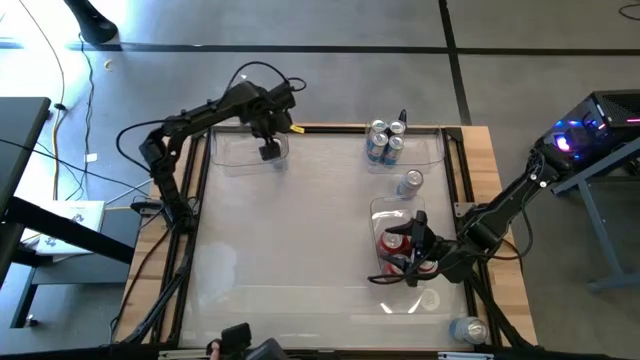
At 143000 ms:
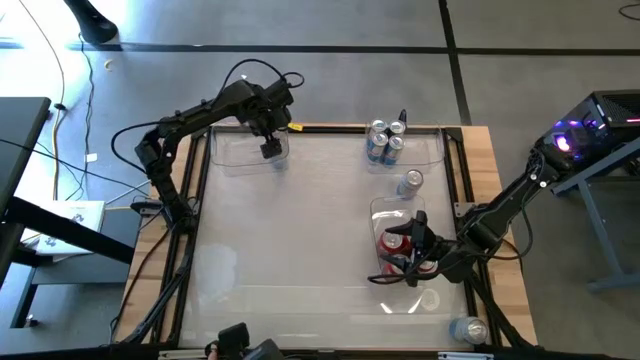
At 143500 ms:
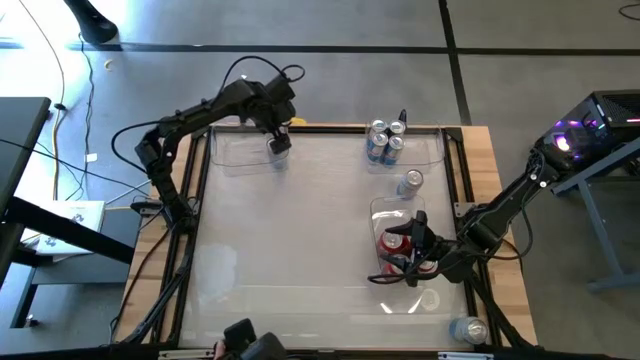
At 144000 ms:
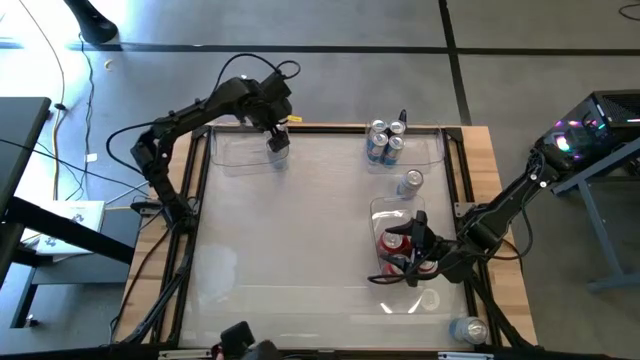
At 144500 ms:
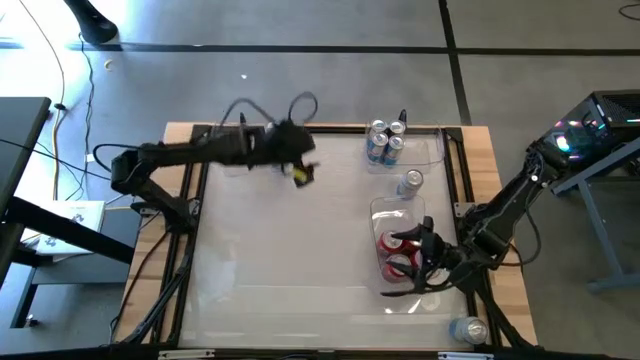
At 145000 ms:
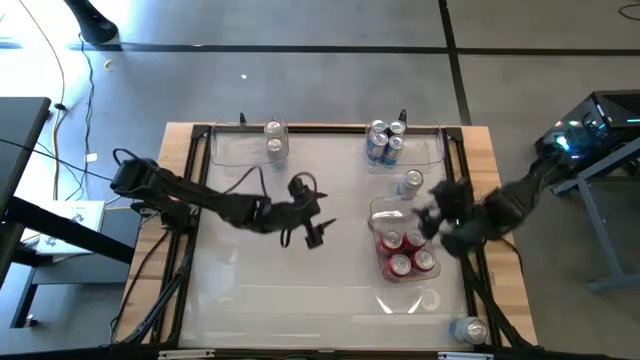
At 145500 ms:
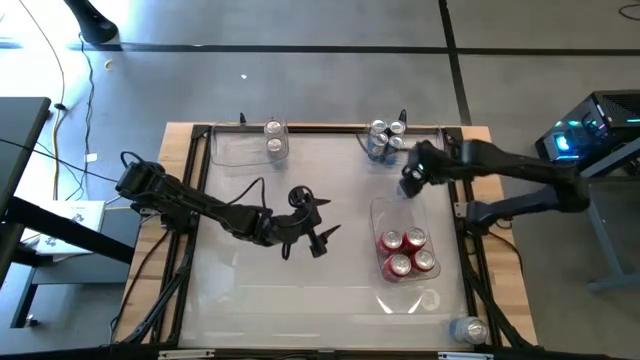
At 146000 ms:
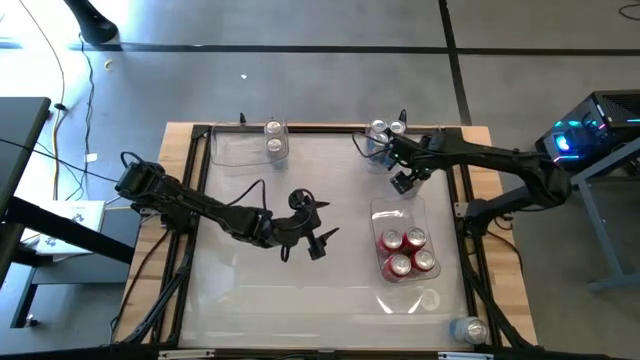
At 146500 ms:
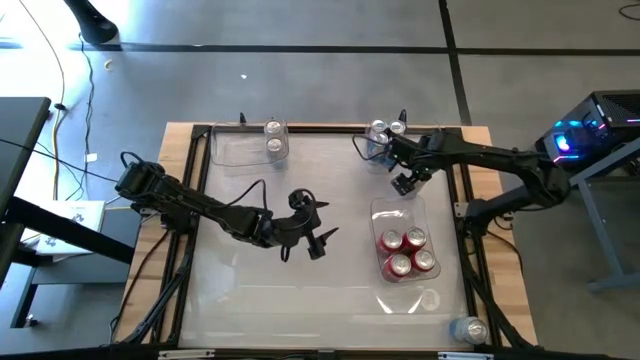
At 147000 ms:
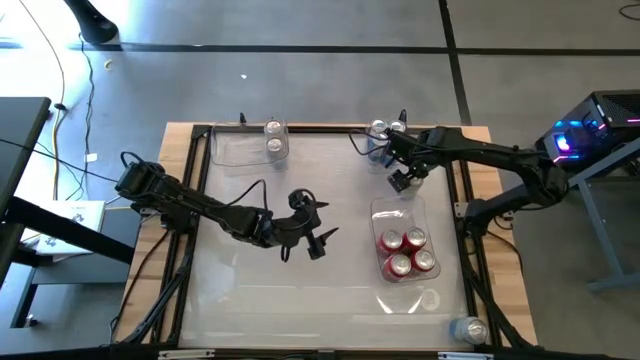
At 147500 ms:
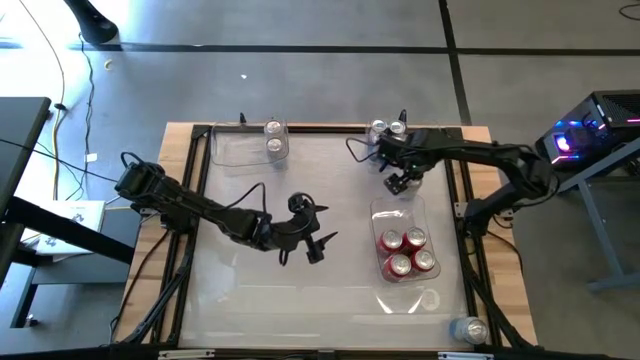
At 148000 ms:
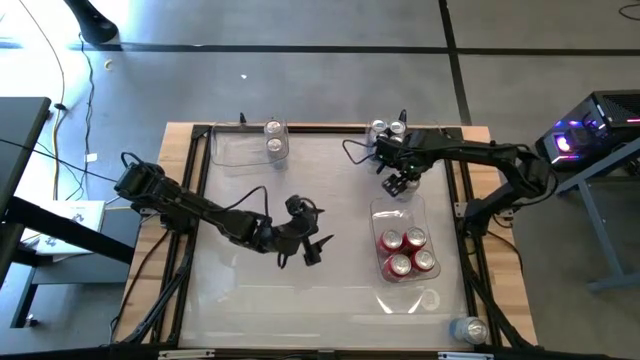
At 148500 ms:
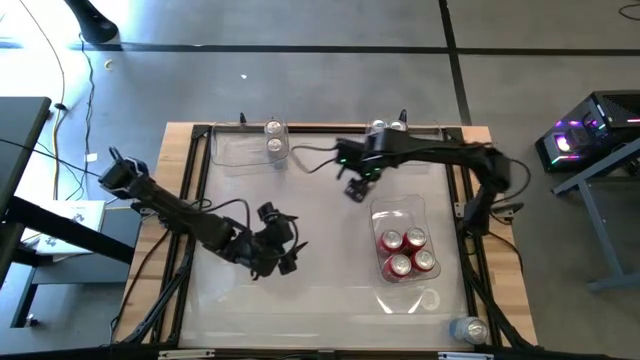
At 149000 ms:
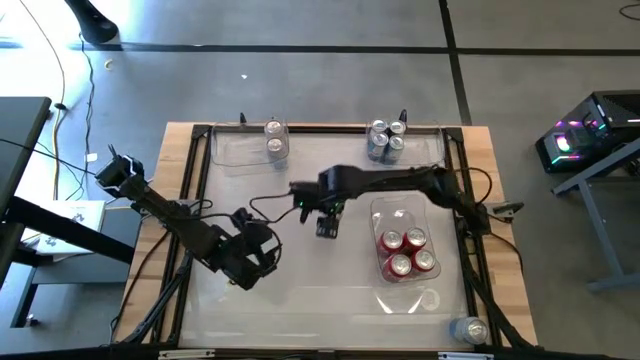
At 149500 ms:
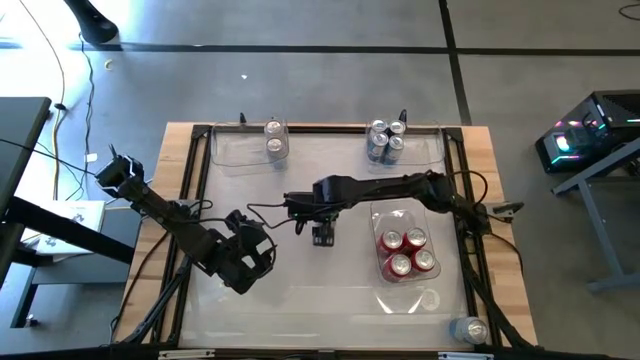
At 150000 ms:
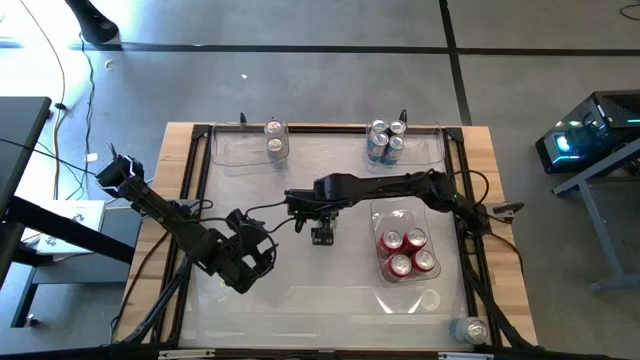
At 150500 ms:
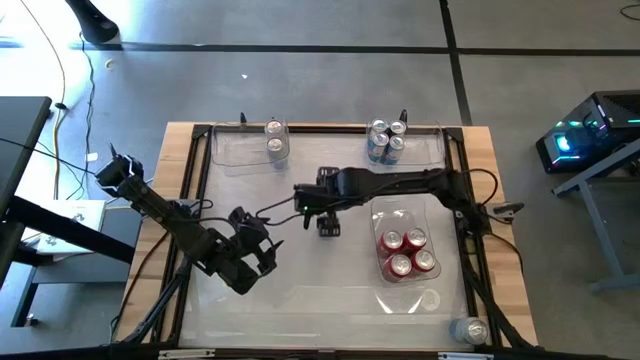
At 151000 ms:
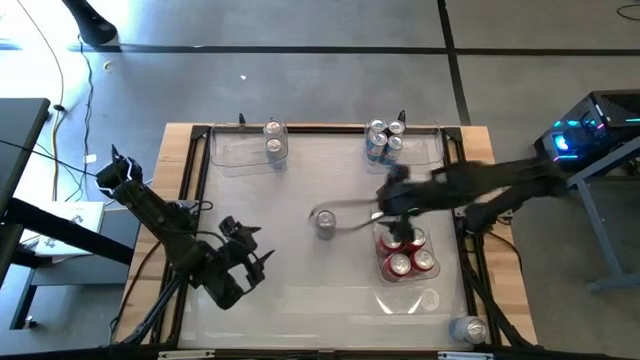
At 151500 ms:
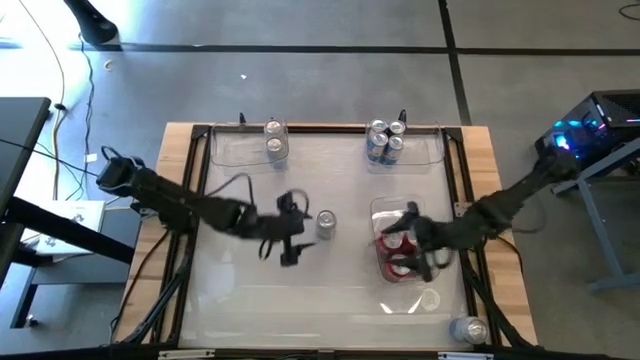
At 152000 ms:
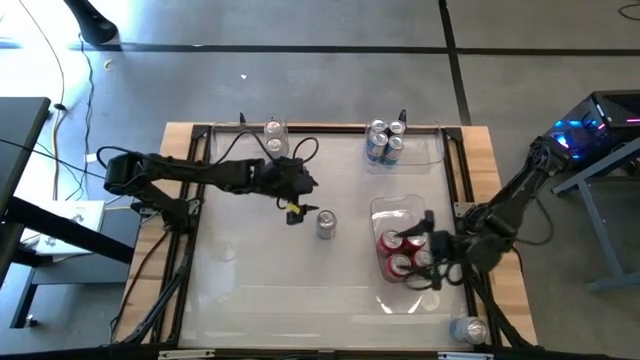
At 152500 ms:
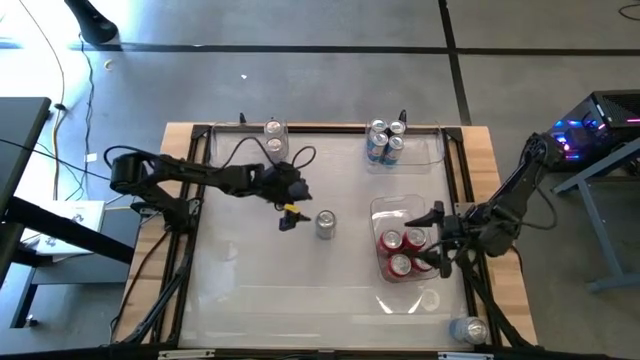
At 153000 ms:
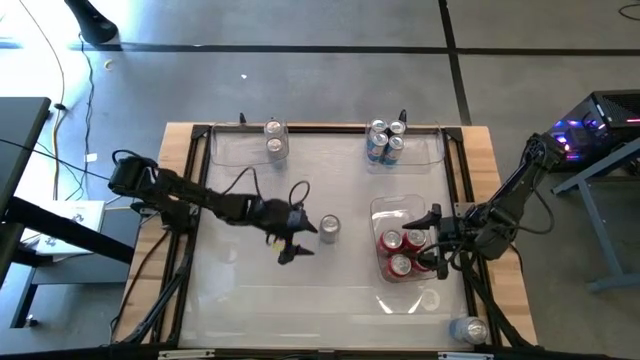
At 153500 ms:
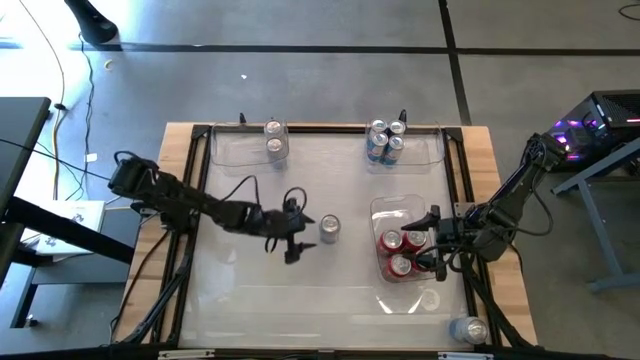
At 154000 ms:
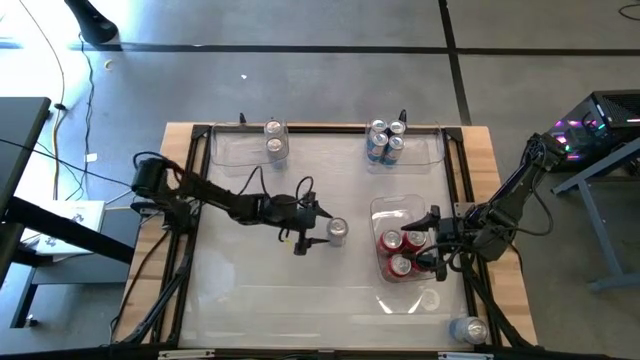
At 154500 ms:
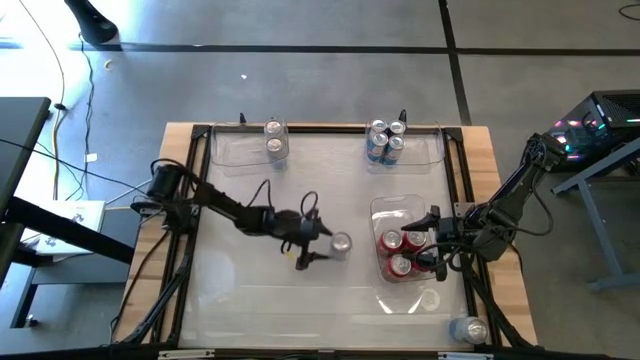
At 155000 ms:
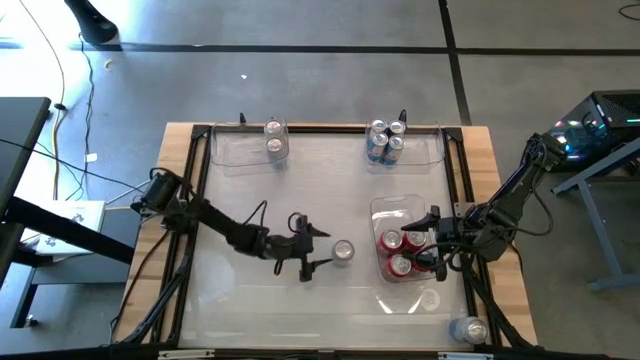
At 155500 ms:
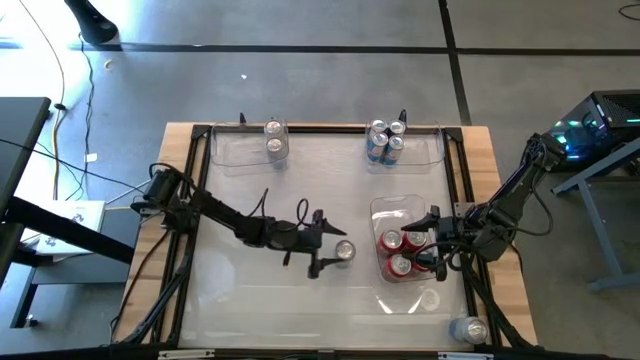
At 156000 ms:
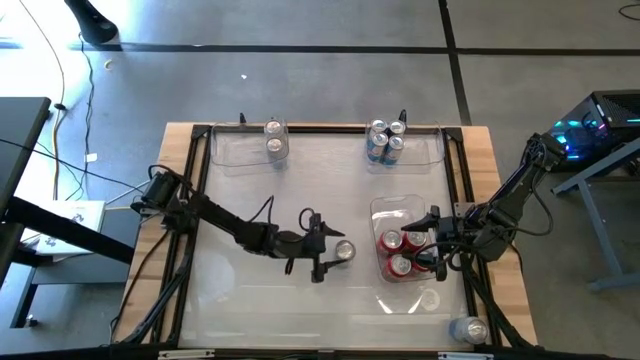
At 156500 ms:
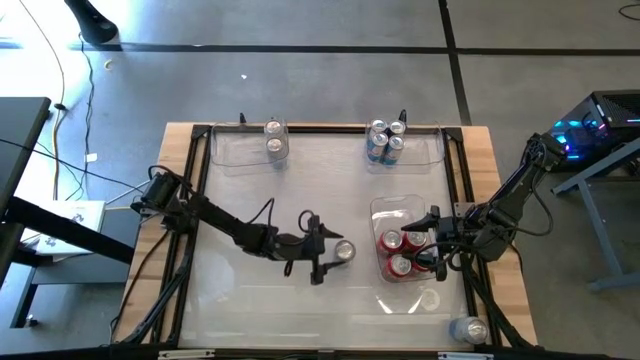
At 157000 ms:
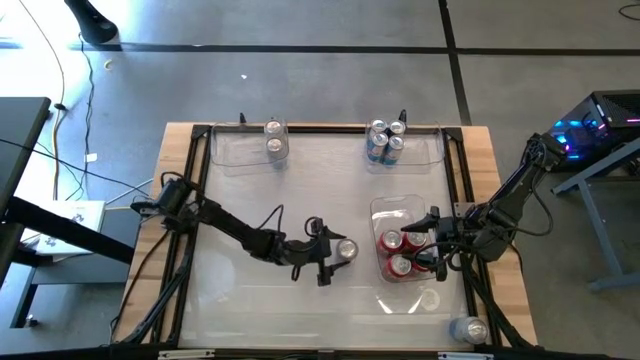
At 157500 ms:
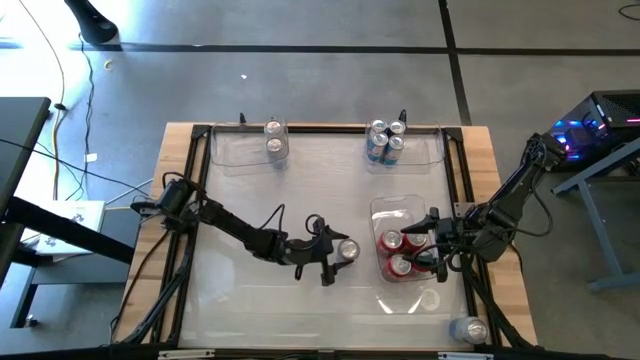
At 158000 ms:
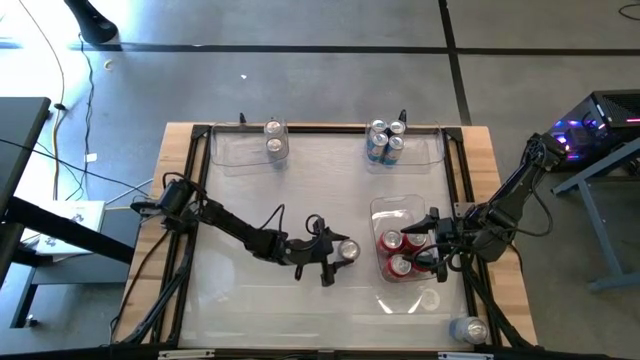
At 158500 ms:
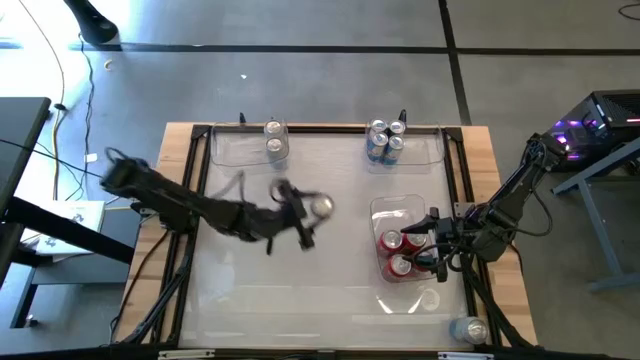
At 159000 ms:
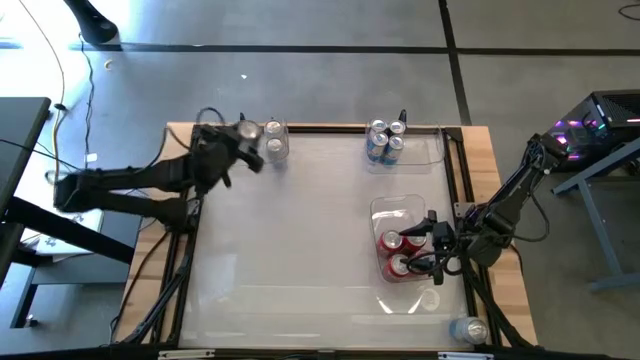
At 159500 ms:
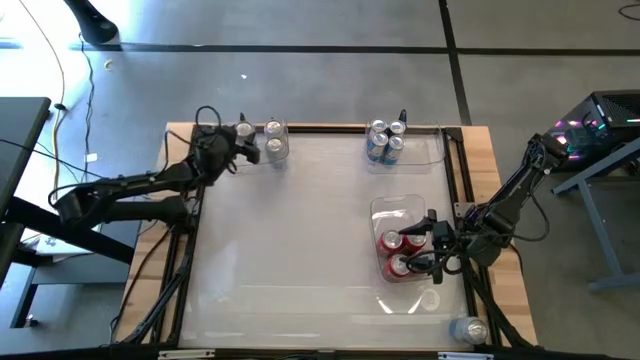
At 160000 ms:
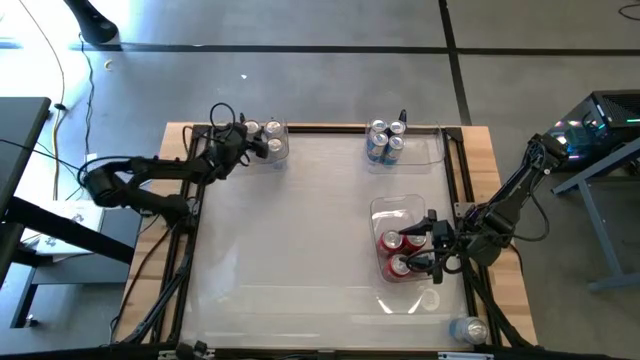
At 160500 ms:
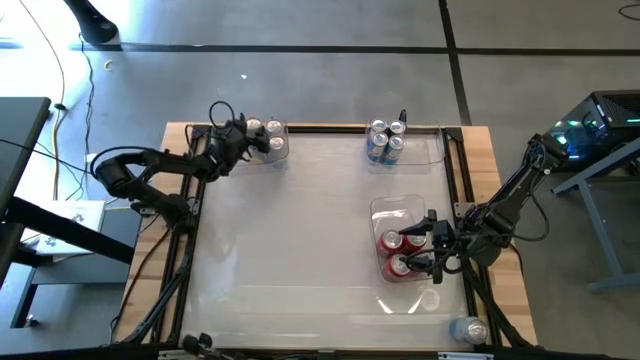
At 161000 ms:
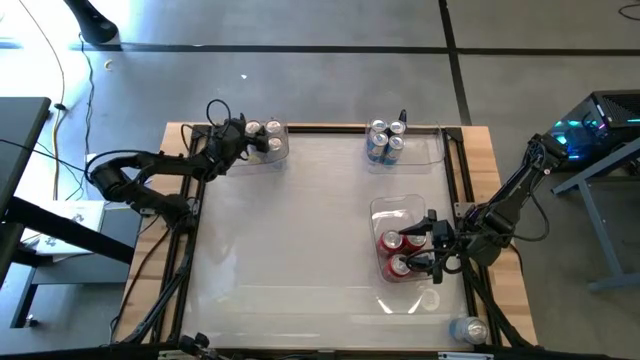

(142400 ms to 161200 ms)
Task: Sort soda cans
Put the top white soda can into the top left transparent bin

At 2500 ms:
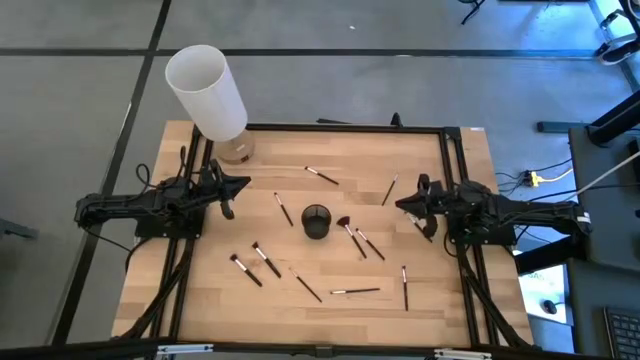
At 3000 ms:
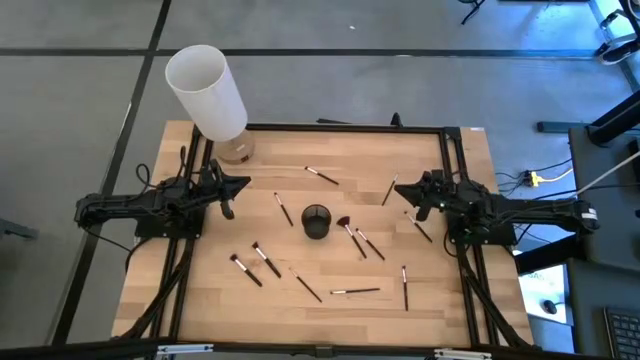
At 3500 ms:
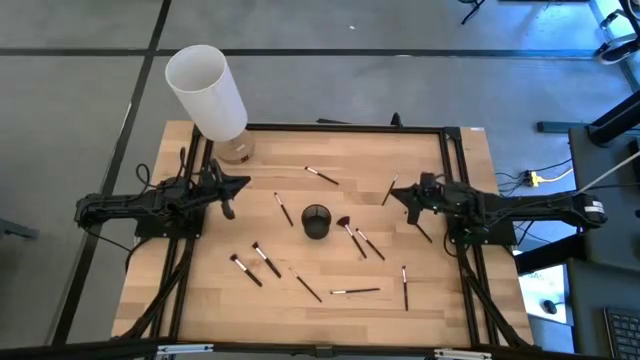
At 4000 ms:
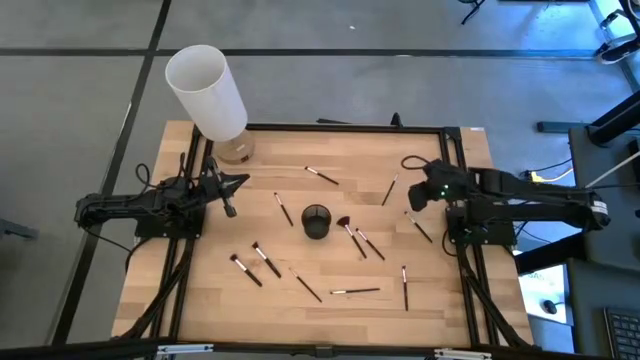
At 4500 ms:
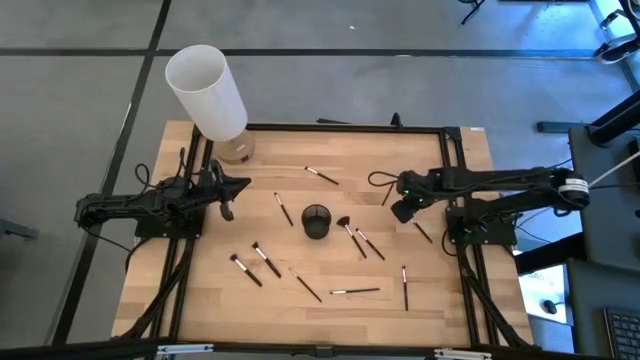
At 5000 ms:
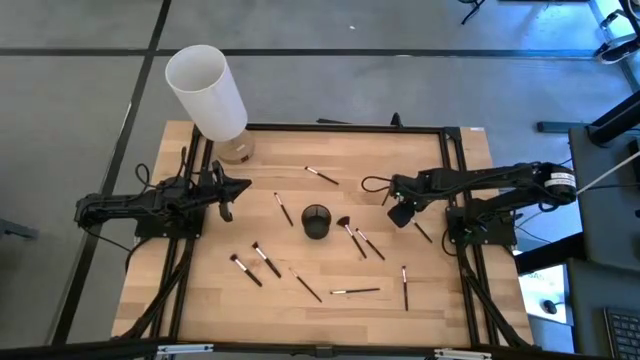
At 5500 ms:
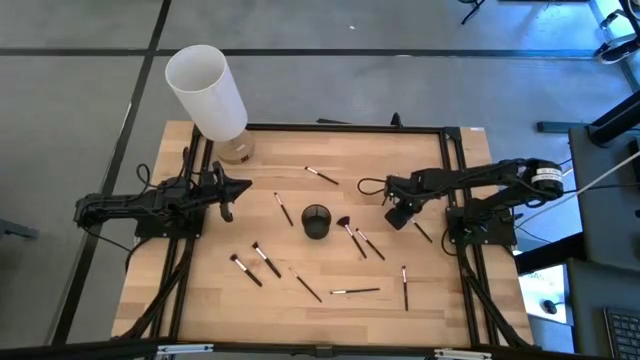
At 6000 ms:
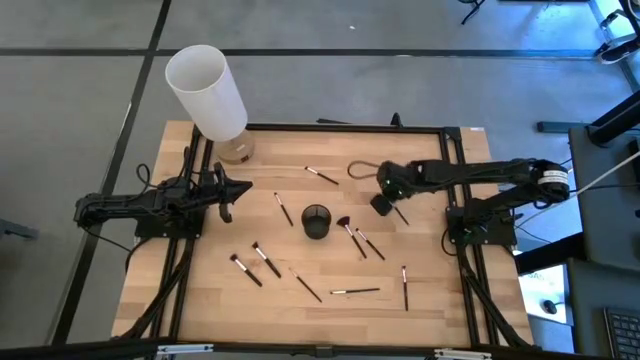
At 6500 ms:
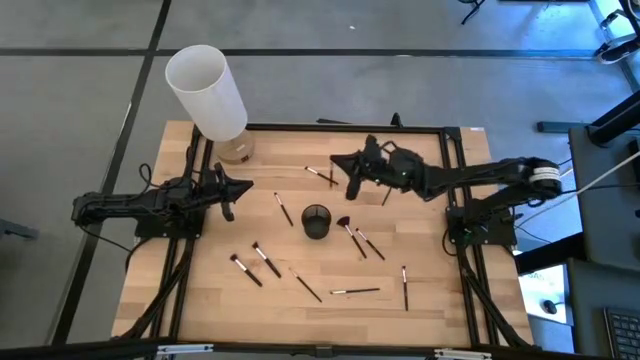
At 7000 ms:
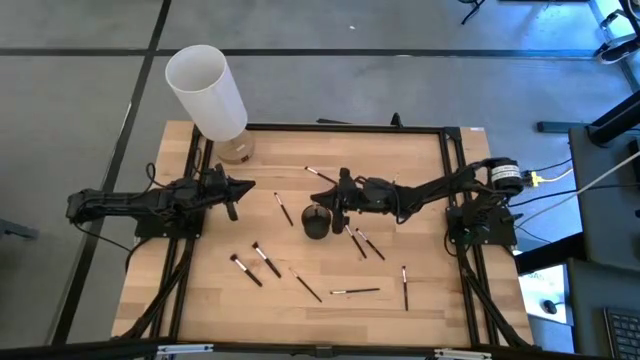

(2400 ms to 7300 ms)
Task: Sort items
Put the silver eyeshadow brush into the pen holder
